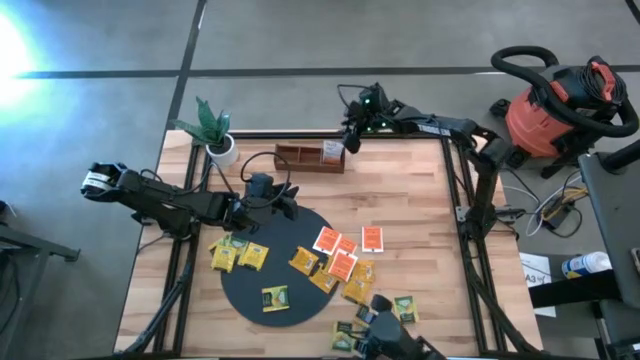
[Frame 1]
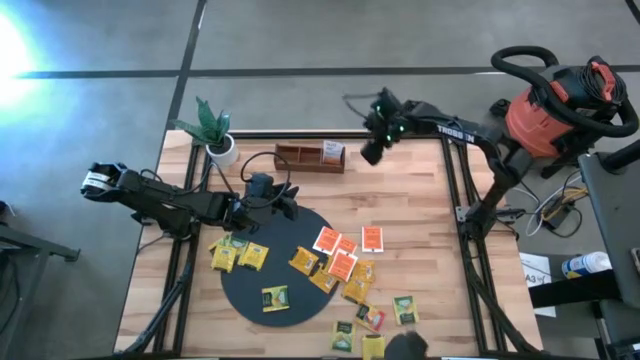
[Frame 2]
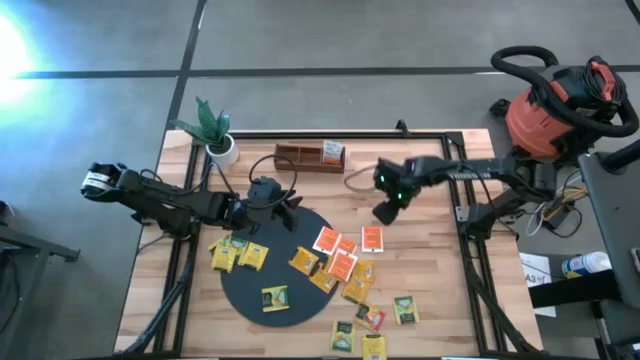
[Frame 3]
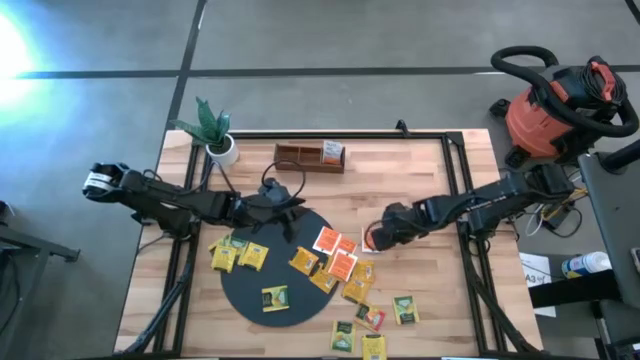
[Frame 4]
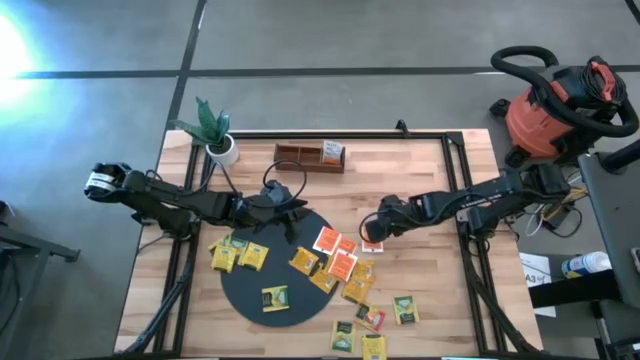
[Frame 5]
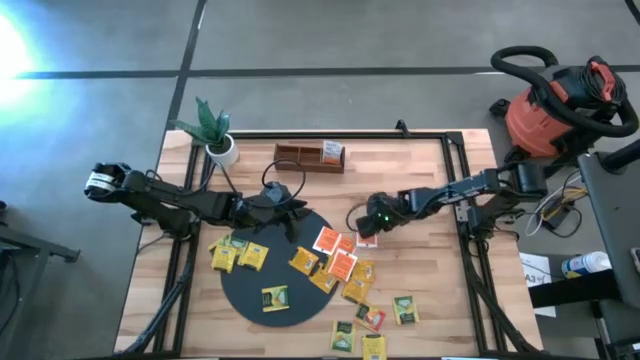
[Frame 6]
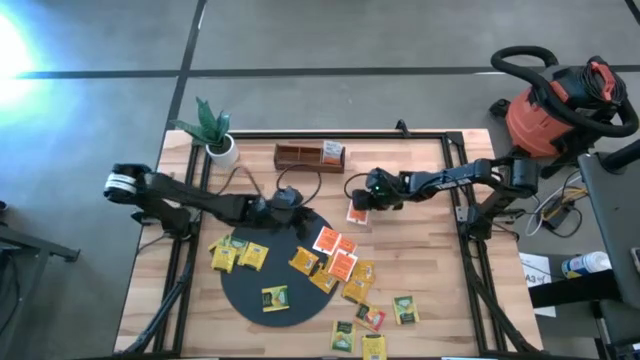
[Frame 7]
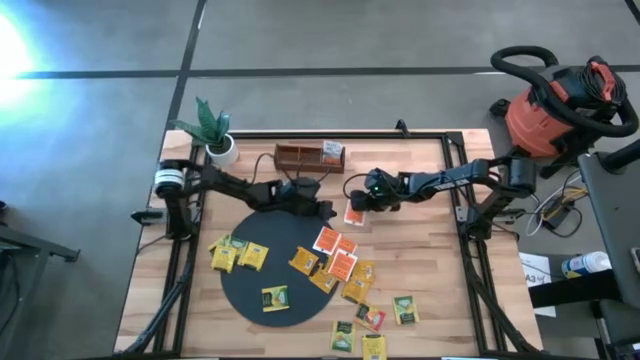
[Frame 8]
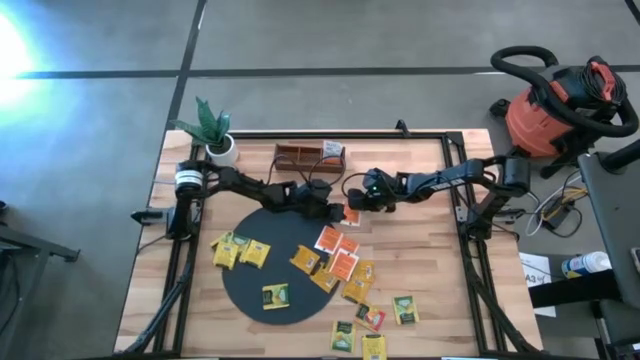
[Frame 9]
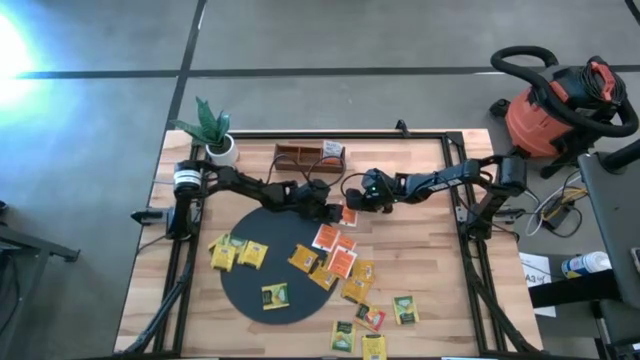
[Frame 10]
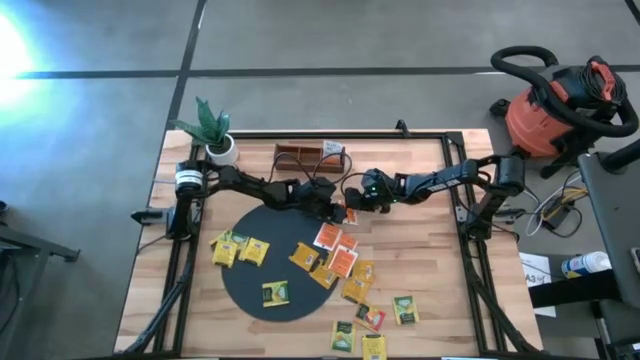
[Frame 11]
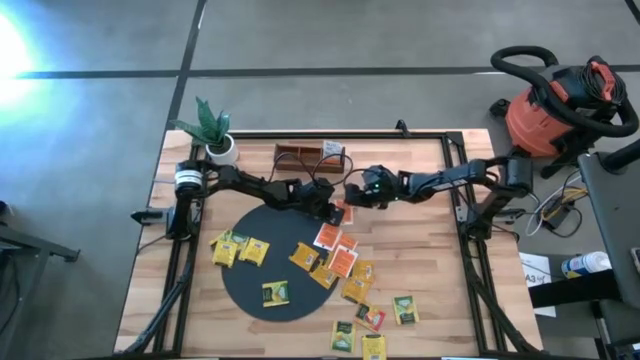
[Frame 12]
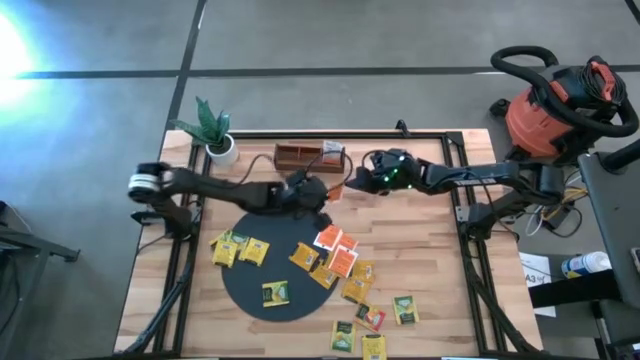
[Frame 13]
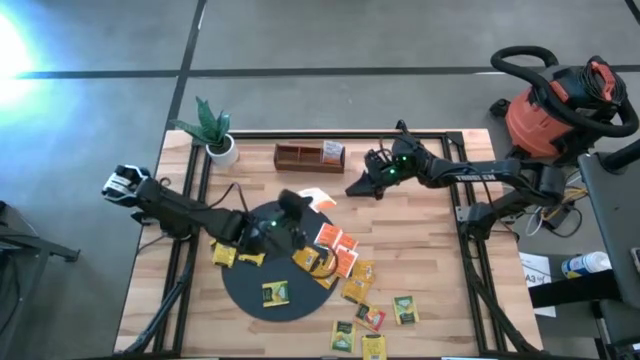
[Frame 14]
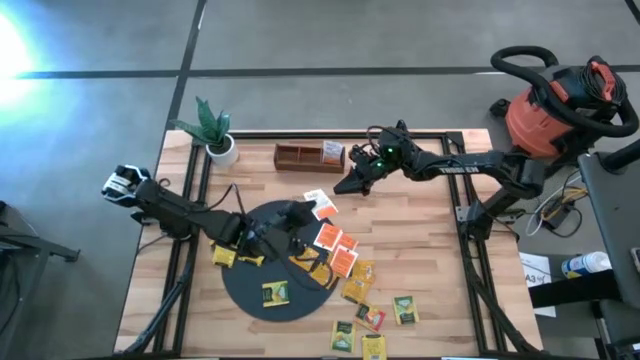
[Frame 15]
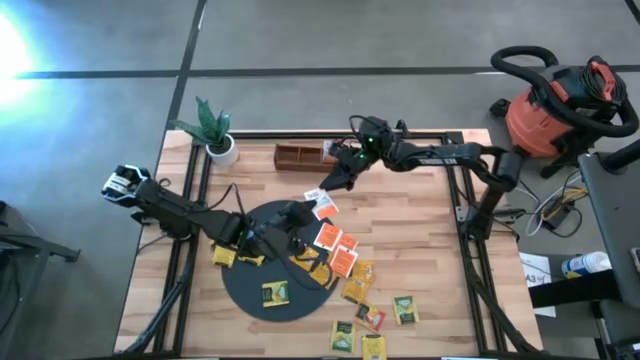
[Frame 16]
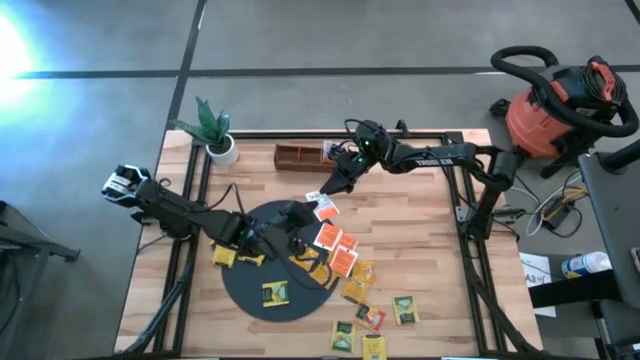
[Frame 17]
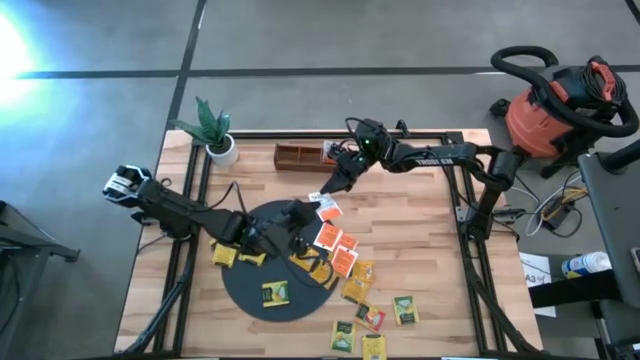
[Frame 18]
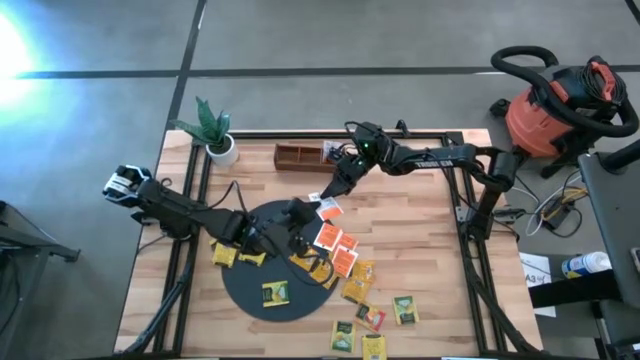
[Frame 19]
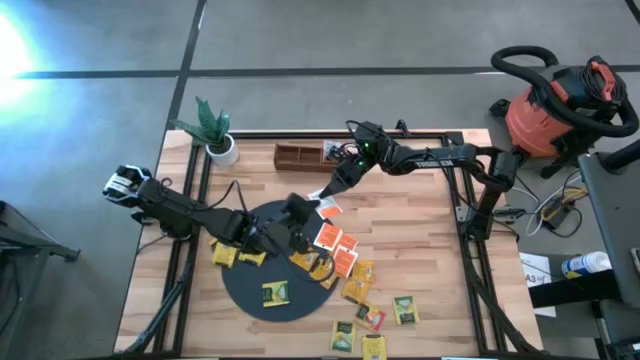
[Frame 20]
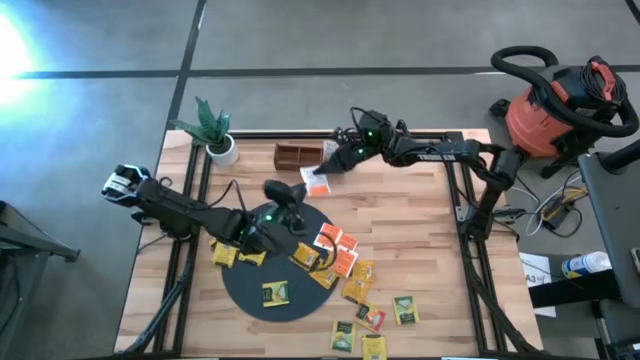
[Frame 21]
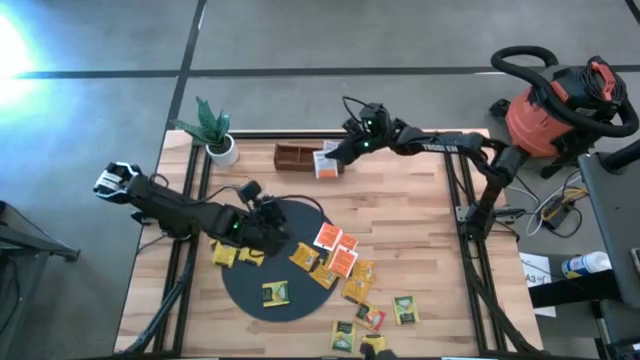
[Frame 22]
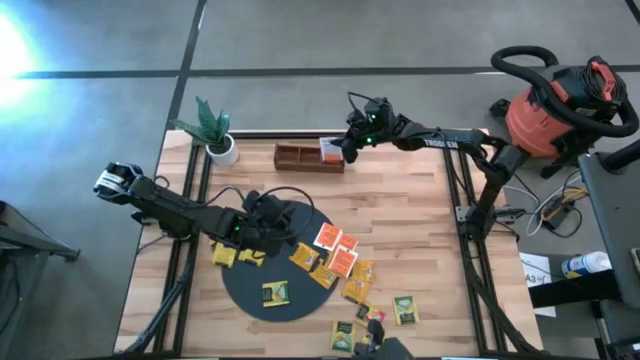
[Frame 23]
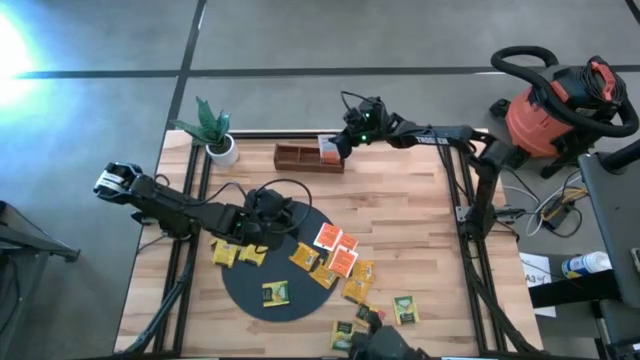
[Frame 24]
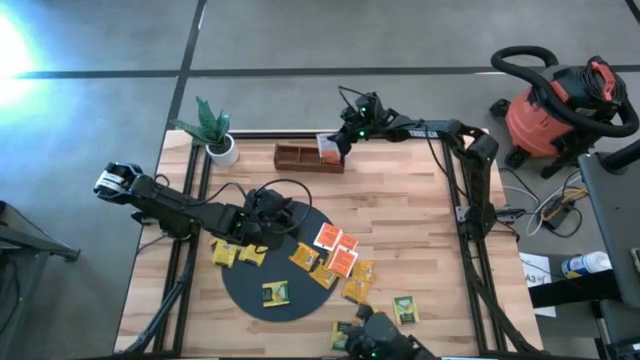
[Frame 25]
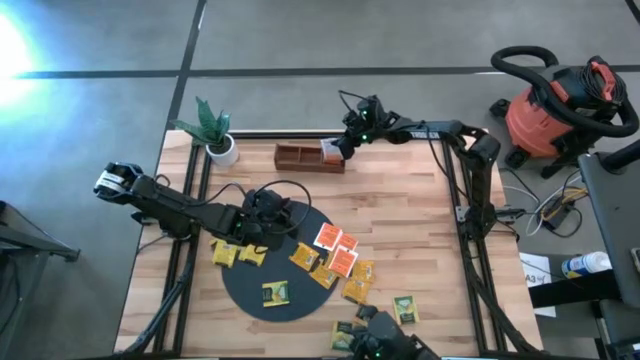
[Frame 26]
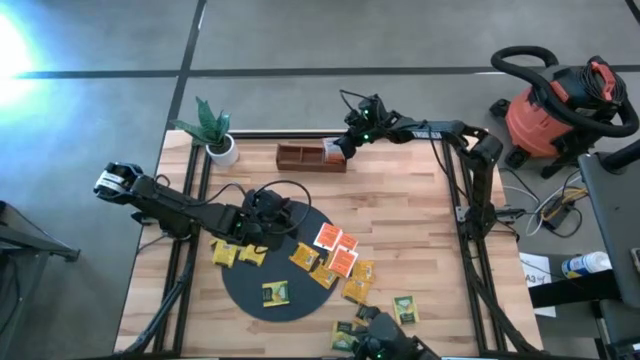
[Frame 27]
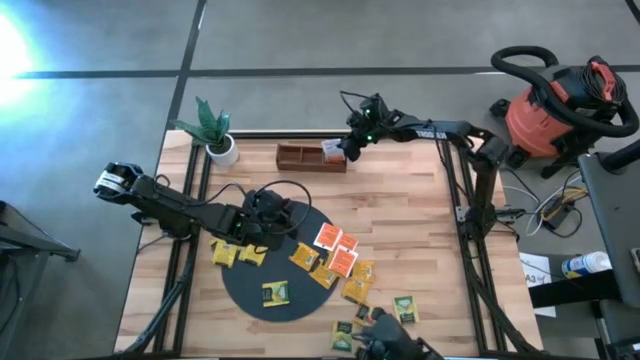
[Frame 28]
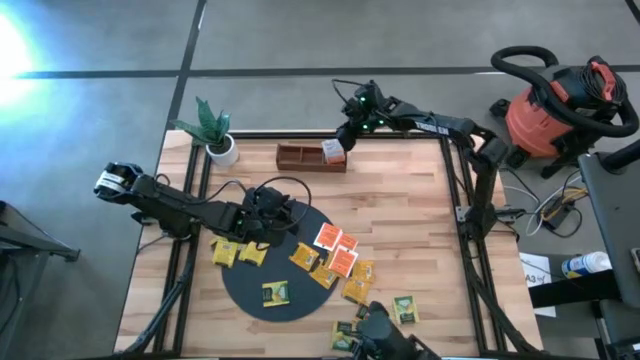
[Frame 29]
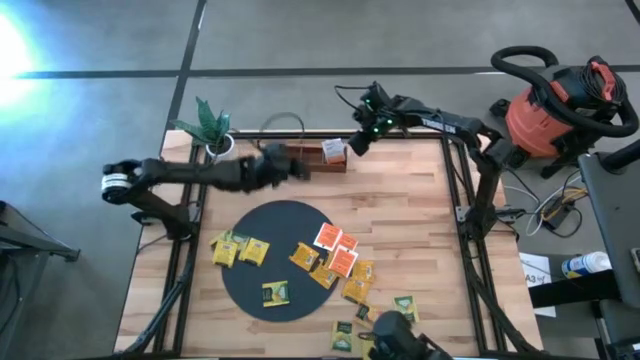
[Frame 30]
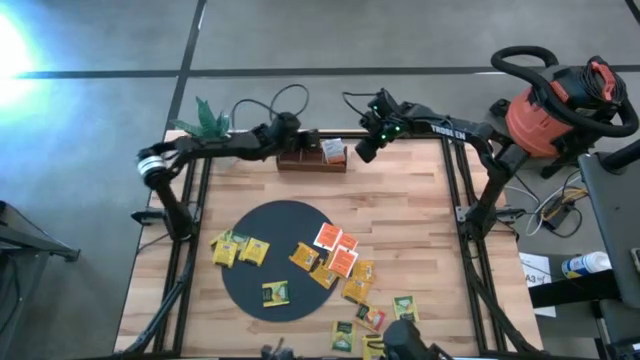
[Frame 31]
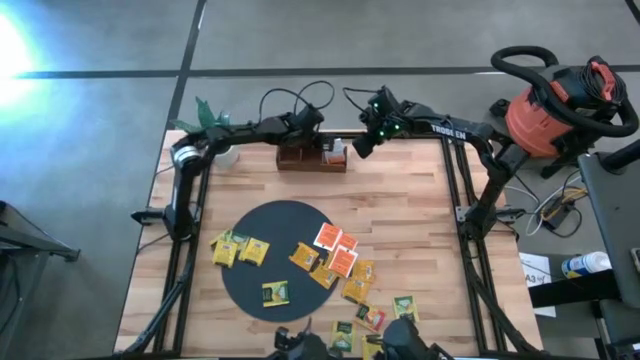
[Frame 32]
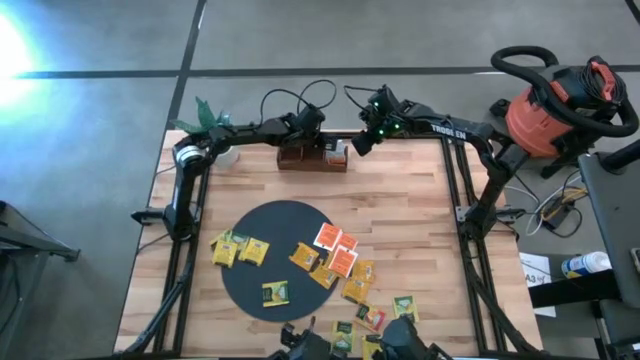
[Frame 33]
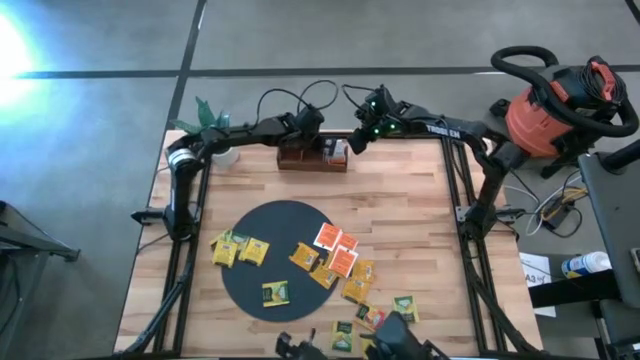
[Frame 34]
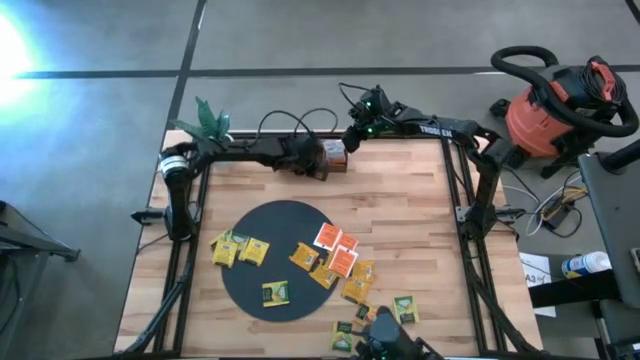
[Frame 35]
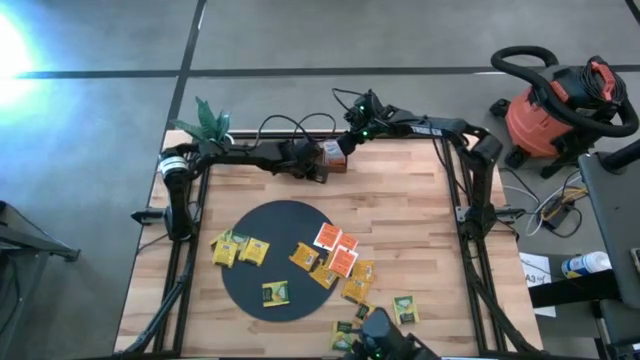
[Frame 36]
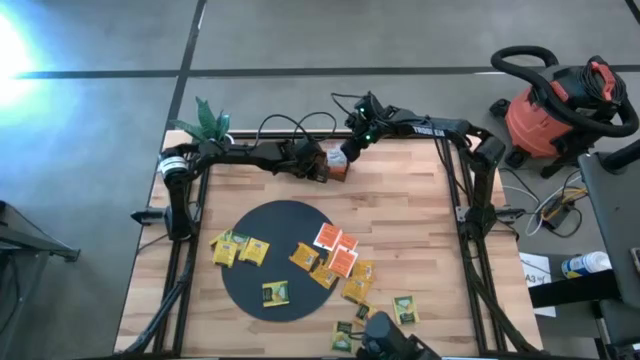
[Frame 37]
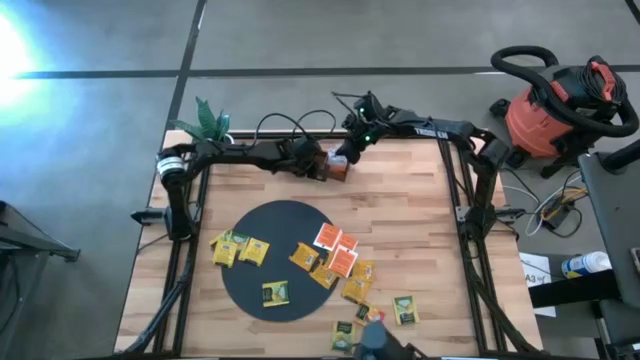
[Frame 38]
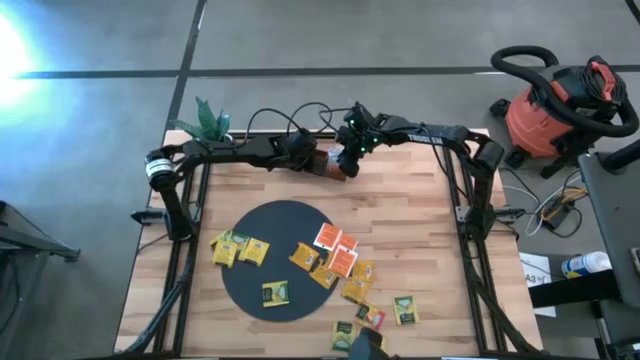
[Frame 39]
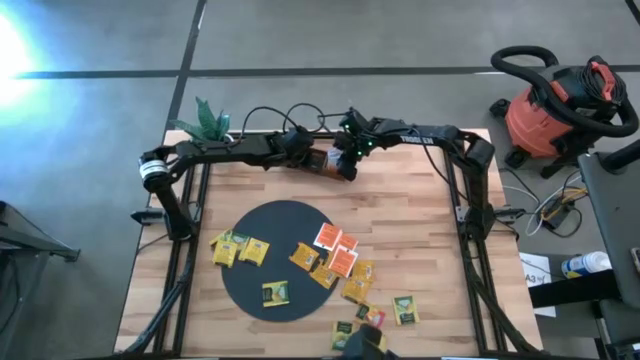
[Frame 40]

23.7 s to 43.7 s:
Task: Pick & Place Tea
Put the white tea bag into the right section of the wooden organizer
